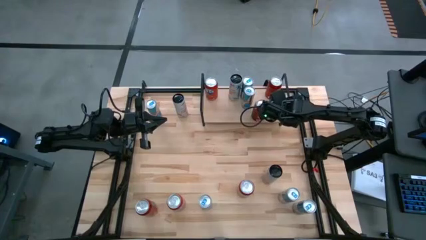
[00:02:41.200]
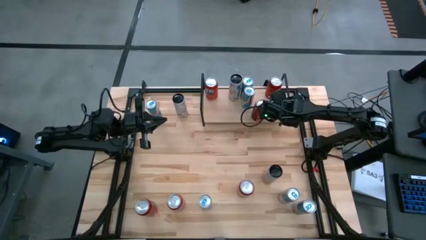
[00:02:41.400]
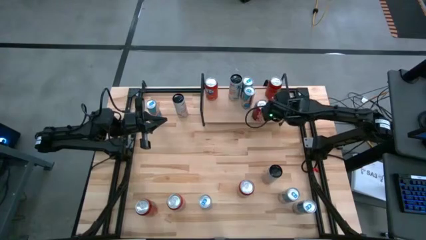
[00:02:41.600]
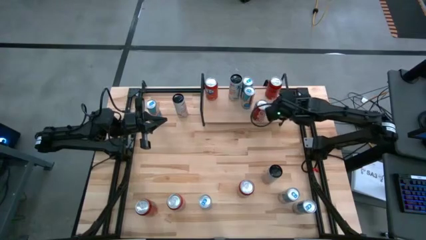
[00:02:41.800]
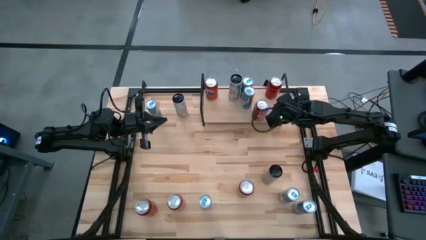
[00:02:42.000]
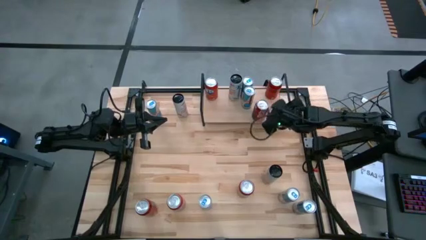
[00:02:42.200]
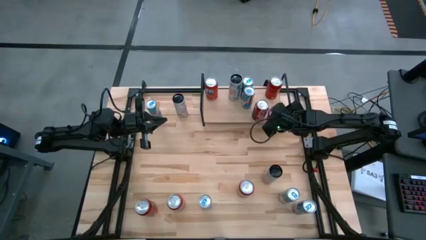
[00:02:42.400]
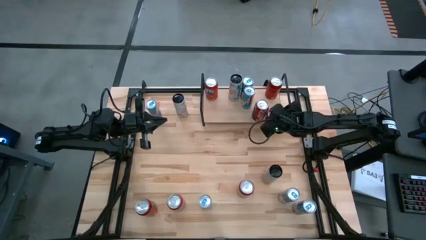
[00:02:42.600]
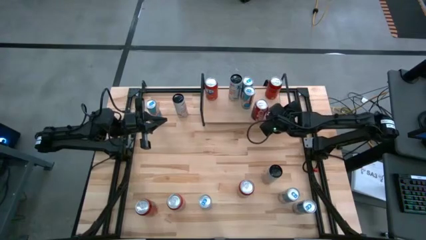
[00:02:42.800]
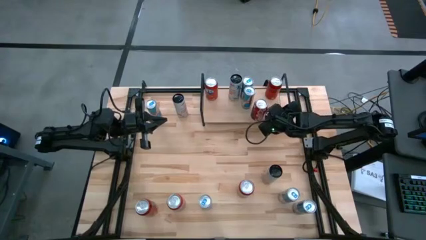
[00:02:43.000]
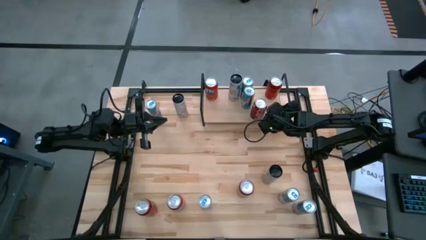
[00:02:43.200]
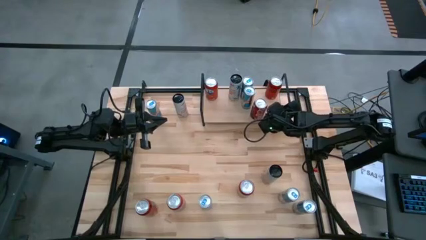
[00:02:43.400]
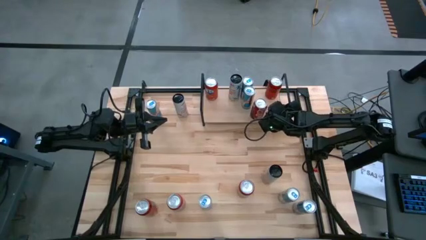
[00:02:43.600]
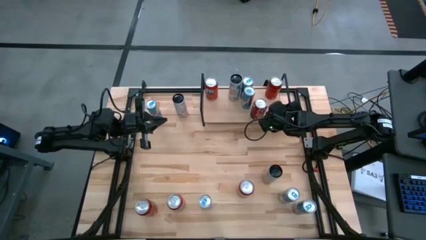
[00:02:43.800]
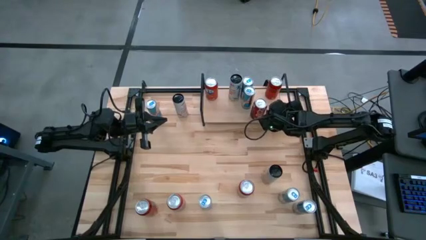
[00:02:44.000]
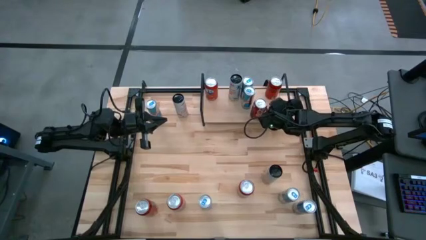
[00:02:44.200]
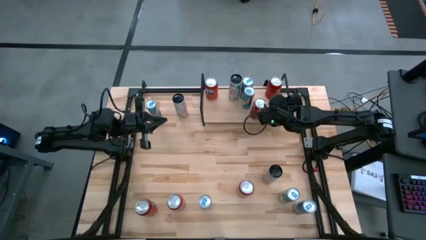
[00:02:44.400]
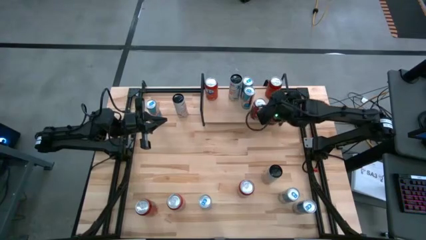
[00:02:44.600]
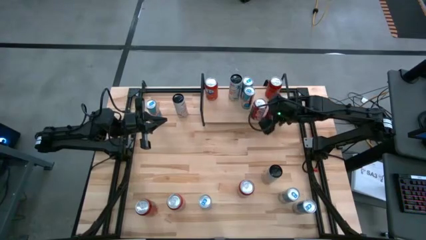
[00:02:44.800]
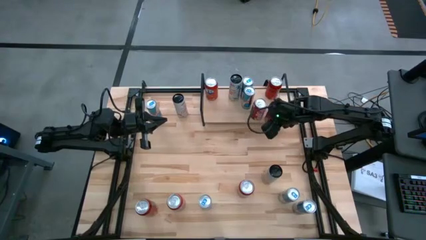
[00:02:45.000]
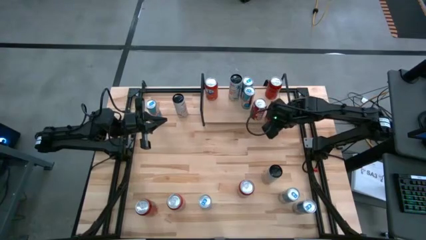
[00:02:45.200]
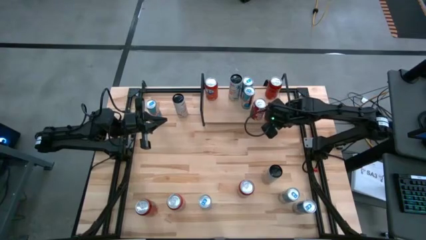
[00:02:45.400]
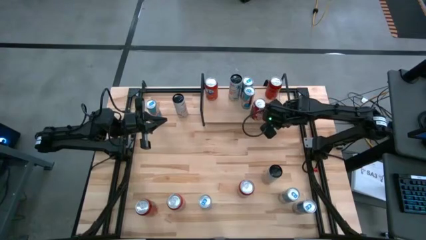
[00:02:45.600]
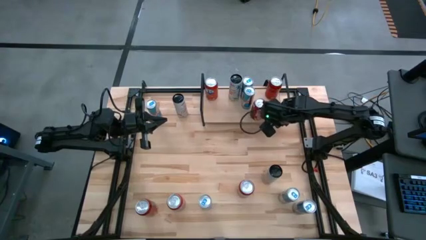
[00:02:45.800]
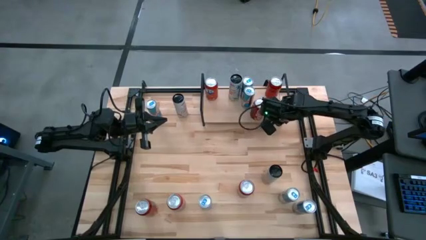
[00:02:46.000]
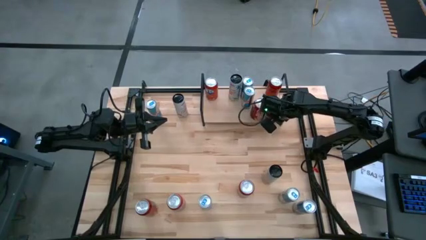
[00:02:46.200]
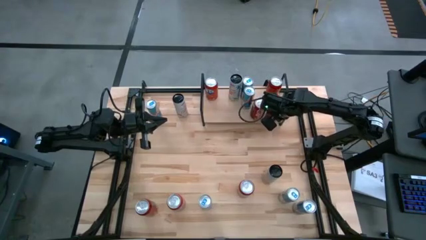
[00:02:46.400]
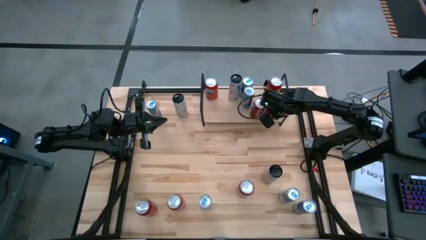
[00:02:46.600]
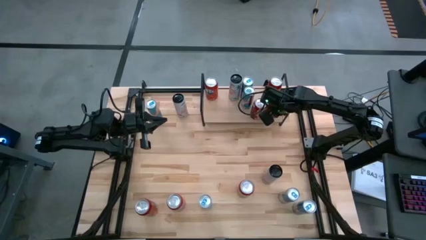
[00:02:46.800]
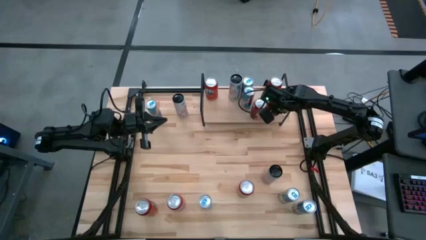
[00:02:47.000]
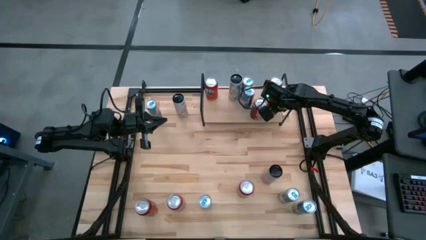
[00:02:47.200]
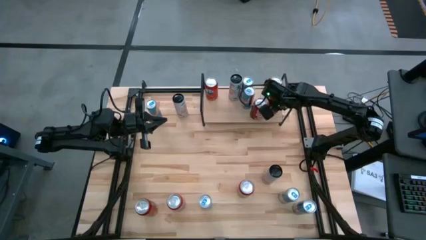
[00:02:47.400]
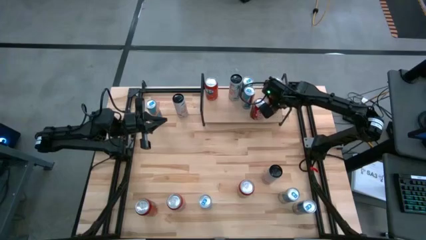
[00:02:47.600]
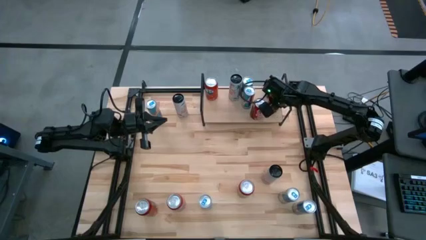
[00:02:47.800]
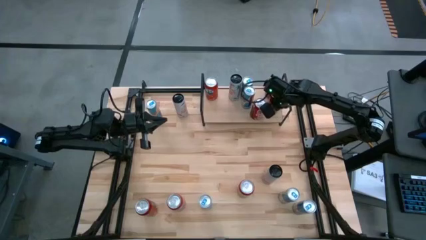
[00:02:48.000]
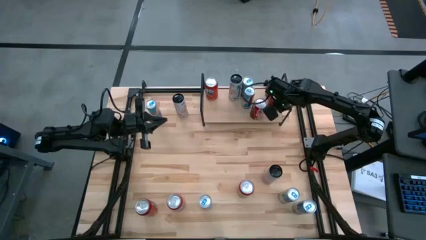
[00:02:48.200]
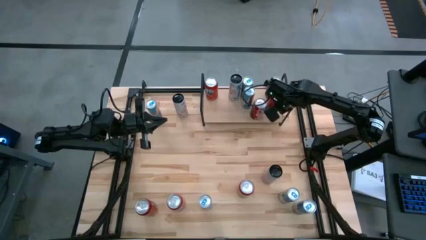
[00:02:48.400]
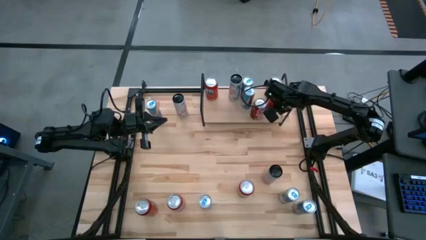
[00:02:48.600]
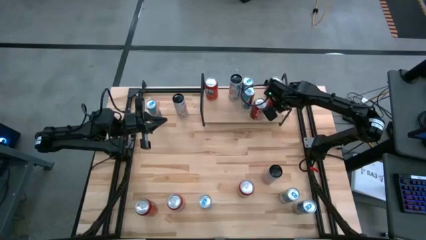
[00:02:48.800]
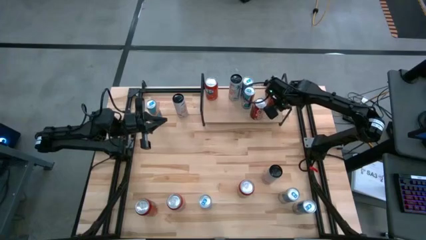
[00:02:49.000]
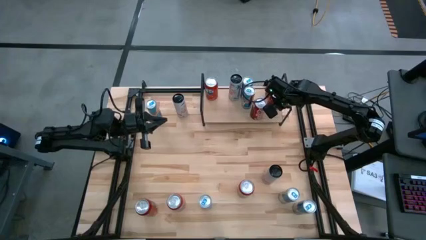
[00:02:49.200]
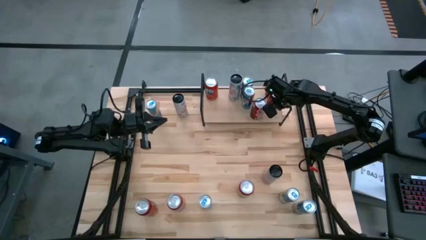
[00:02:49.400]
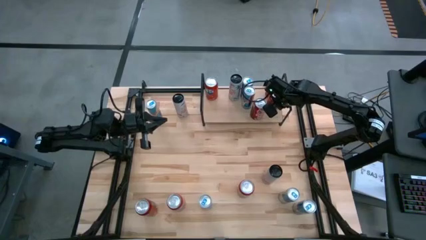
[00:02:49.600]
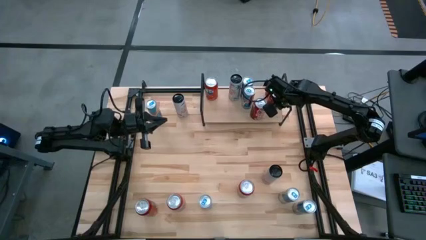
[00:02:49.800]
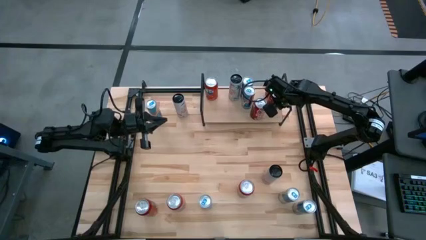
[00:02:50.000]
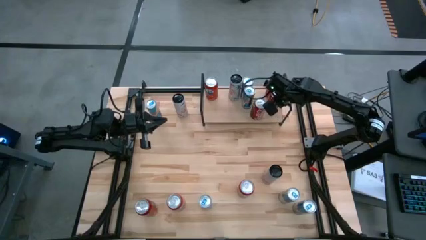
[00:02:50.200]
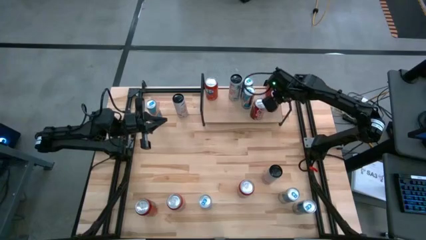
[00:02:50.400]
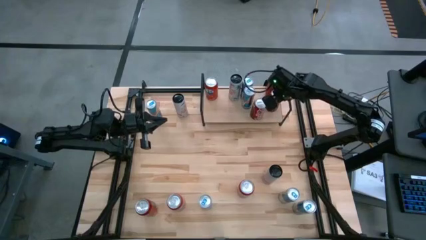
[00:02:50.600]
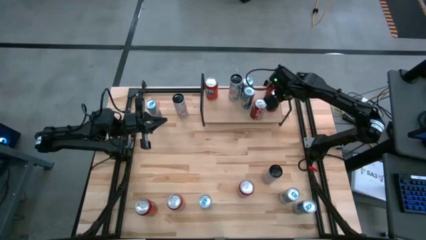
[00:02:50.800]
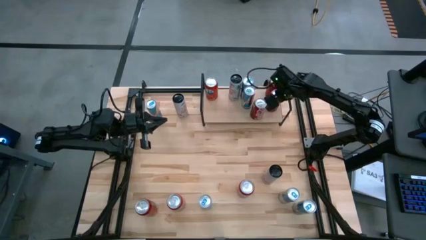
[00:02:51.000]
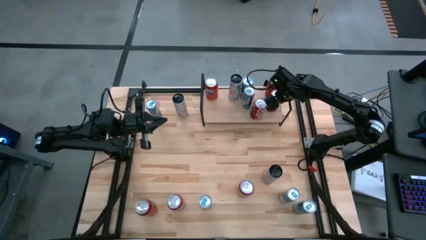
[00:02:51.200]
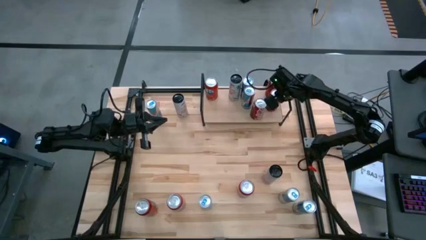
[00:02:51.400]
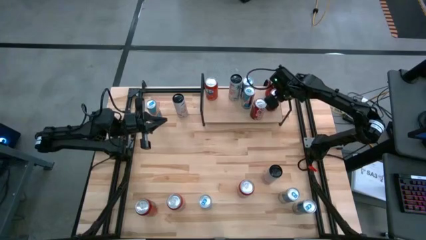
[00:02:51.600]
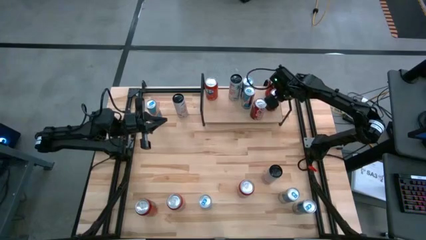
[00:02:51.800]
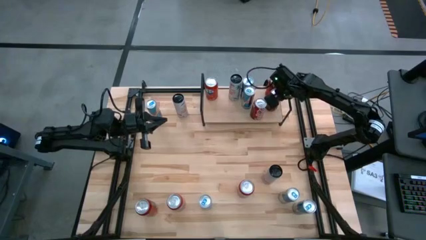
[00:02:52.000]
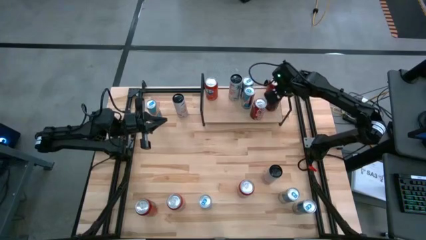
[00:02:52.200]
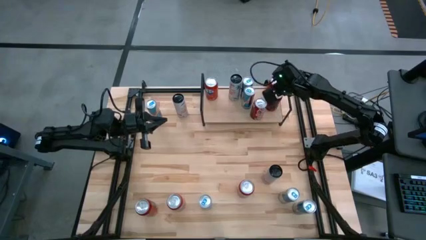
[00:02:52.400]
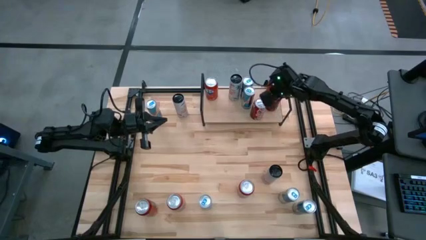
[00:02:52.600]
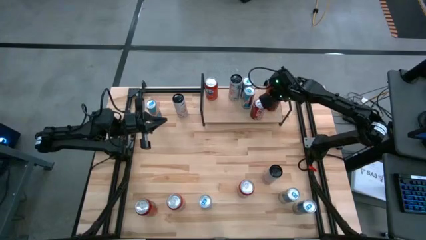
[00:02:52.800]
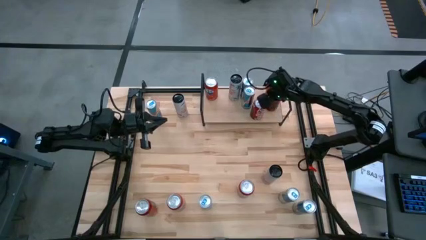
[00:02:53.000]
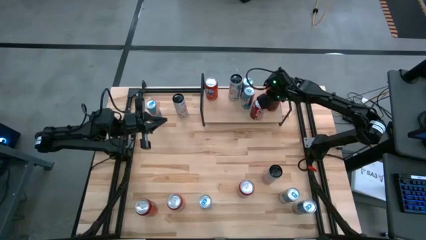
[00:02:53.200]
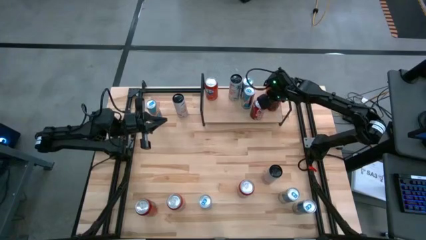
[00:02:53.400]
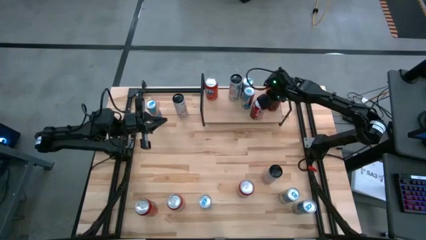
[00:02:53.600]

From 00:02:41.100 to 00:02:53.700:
Task: Place canned beverage on shelf
Put the dark red soda can on the shelf

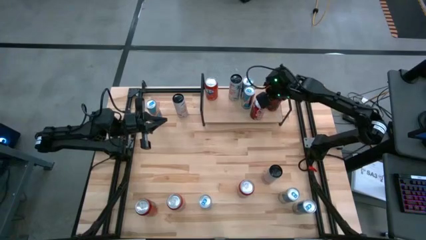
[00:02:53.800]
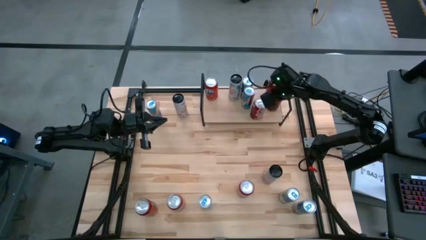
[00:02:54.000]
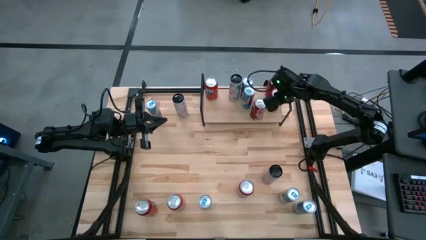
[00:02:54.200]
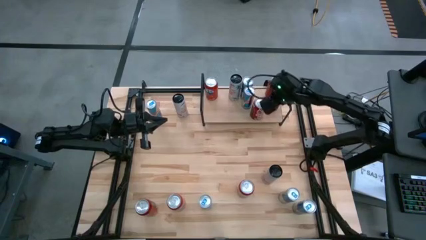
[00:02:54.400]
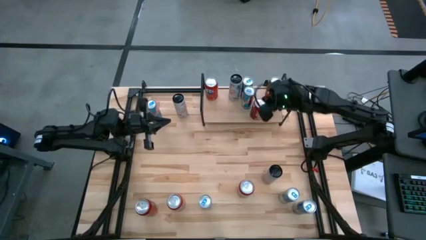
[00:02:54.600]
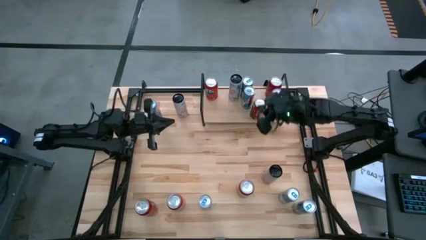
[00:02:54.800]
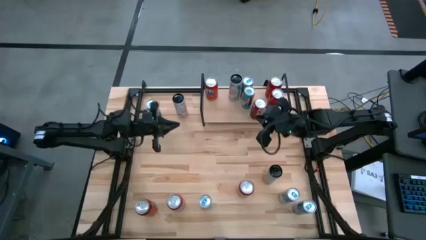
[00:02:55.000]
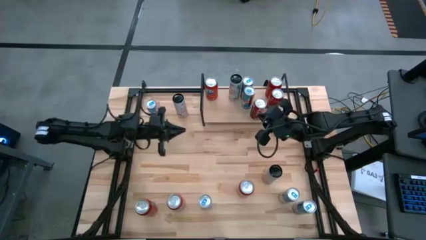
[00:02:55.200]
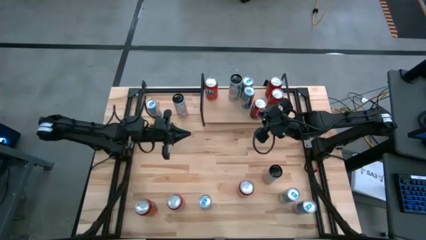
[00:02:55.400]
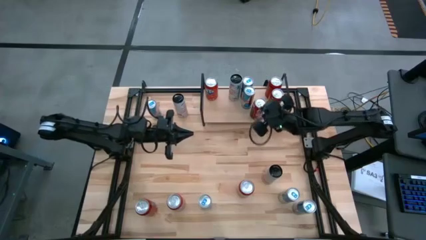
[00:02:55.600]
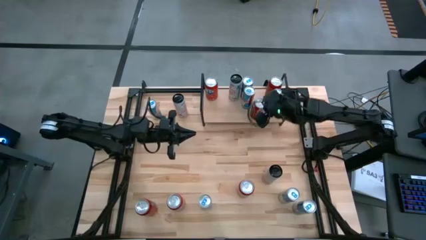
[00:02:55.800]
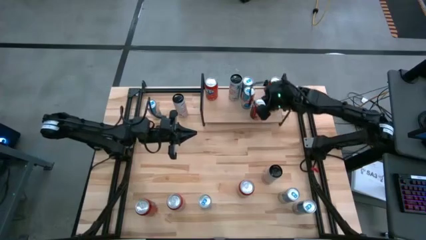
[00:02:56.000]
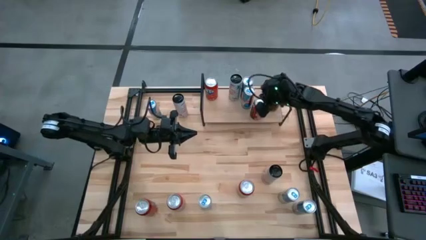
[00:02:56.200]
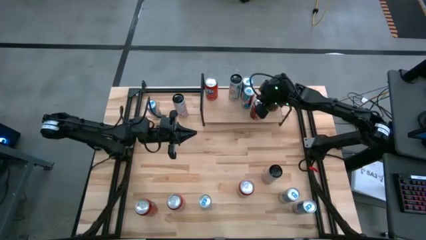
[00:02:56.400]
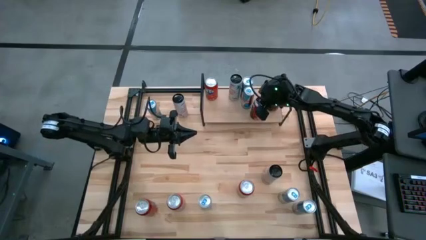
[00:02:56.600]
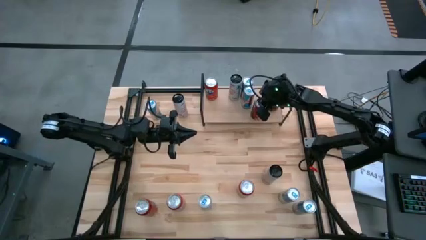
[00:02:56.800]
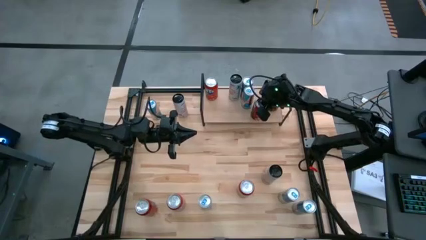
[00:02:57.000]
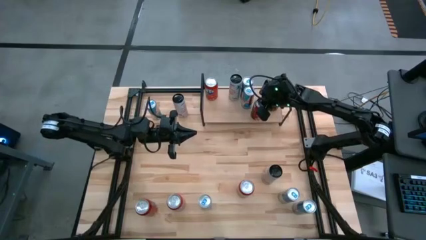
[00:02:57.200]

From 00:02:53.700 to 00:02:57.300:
Adjust the red soda can on the shelf
